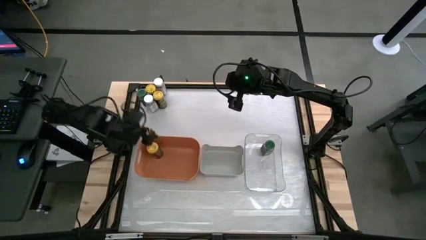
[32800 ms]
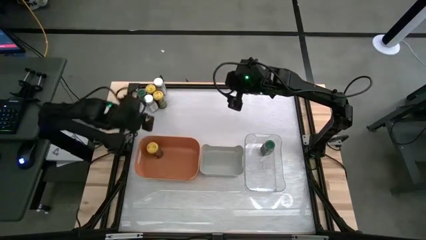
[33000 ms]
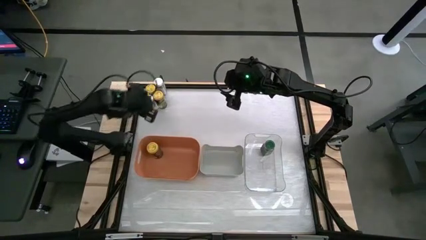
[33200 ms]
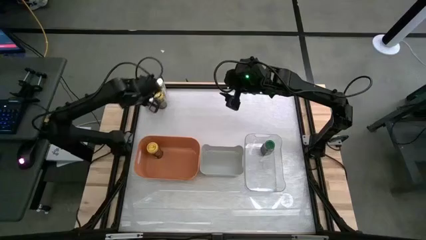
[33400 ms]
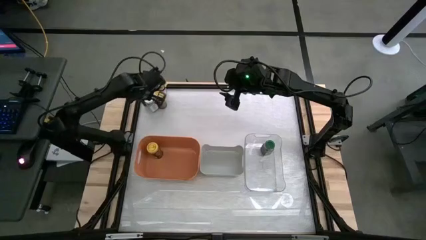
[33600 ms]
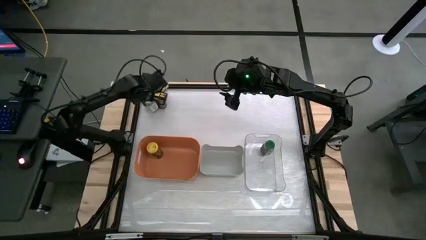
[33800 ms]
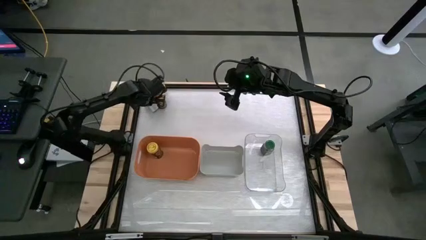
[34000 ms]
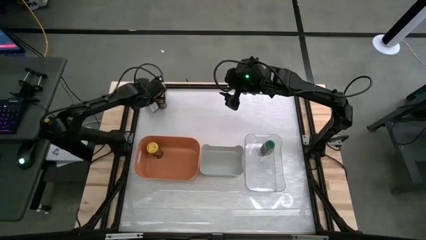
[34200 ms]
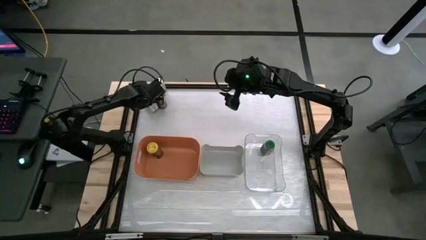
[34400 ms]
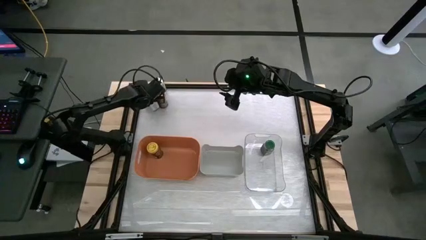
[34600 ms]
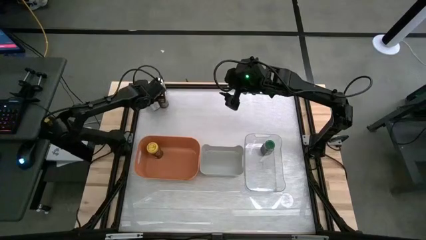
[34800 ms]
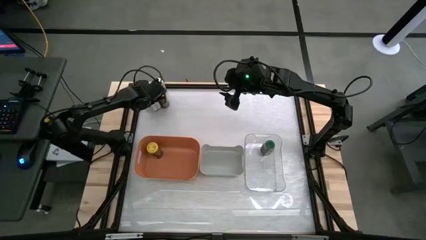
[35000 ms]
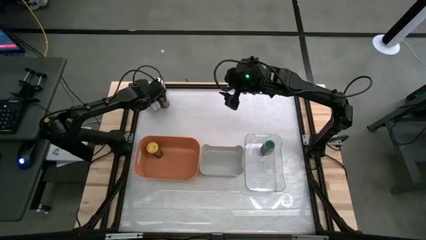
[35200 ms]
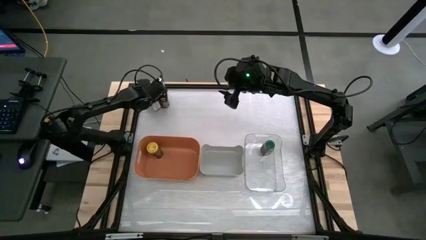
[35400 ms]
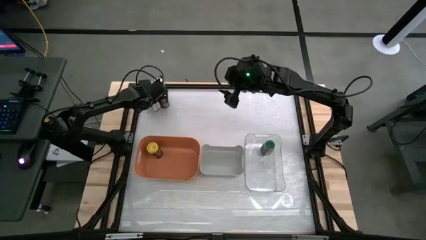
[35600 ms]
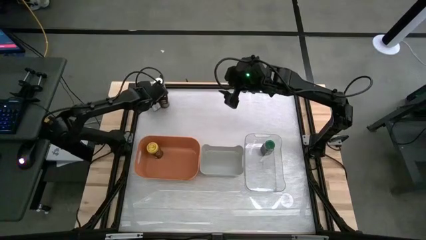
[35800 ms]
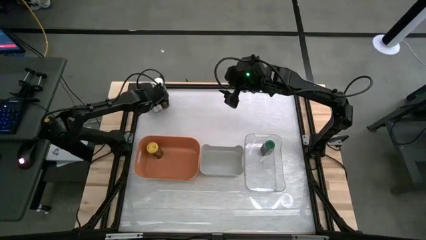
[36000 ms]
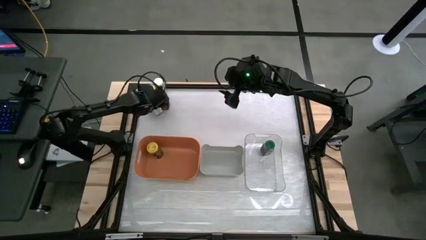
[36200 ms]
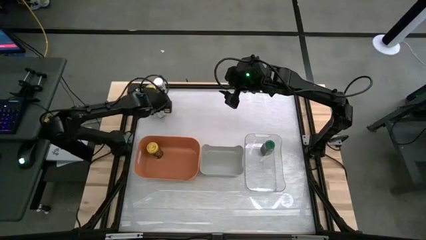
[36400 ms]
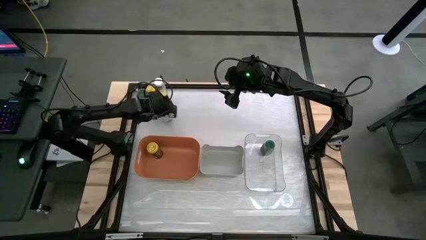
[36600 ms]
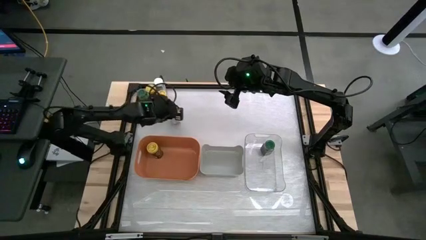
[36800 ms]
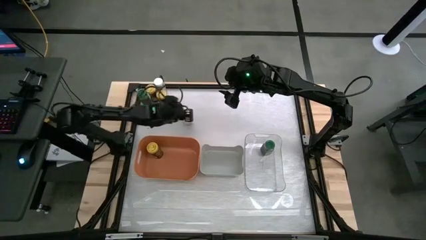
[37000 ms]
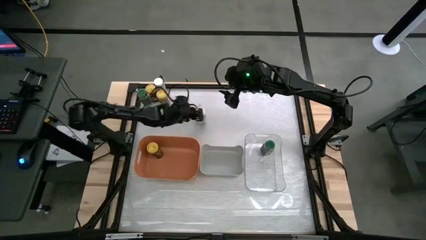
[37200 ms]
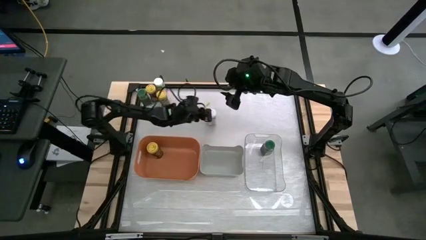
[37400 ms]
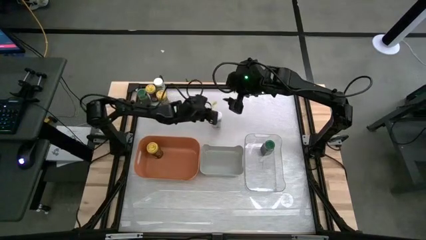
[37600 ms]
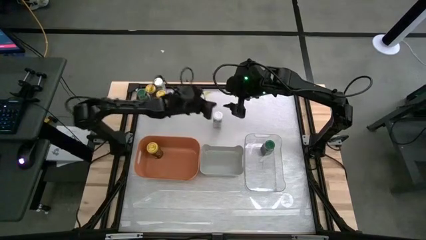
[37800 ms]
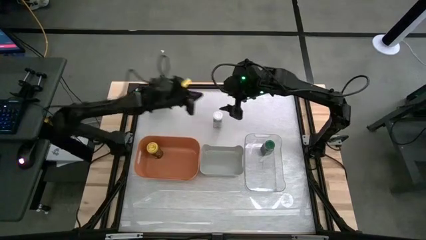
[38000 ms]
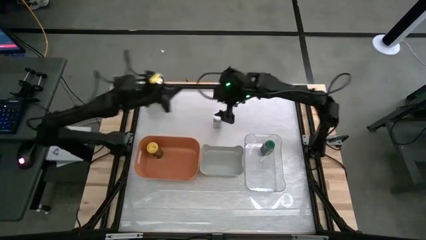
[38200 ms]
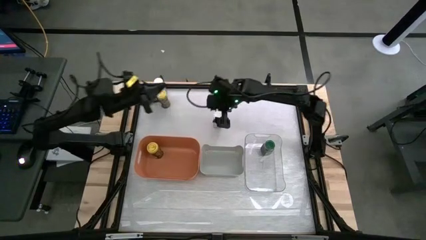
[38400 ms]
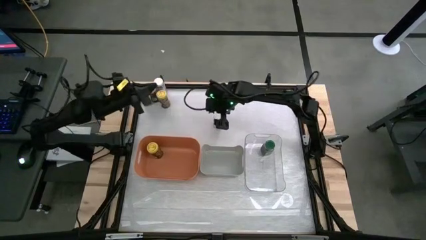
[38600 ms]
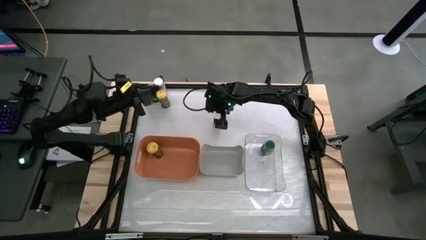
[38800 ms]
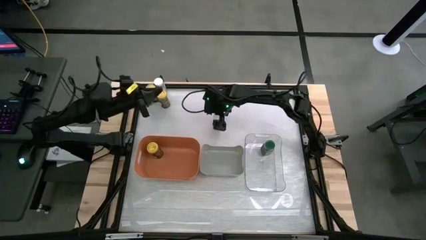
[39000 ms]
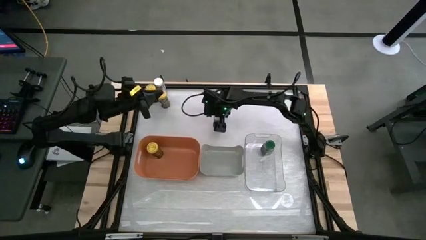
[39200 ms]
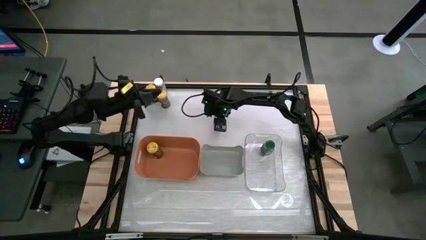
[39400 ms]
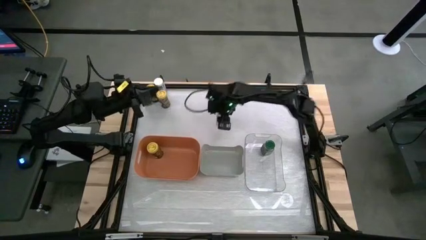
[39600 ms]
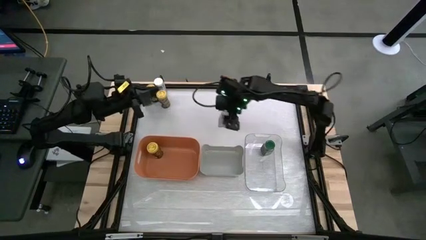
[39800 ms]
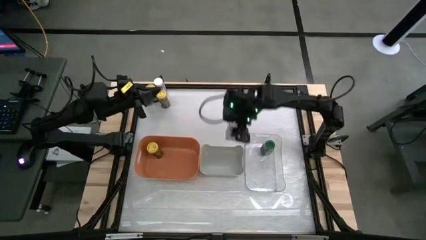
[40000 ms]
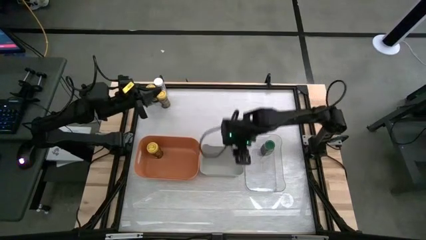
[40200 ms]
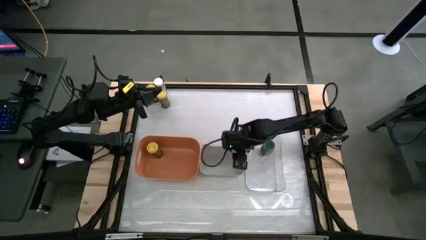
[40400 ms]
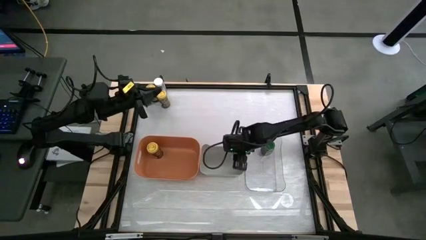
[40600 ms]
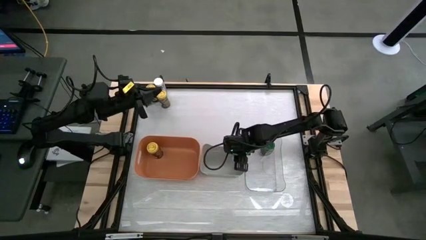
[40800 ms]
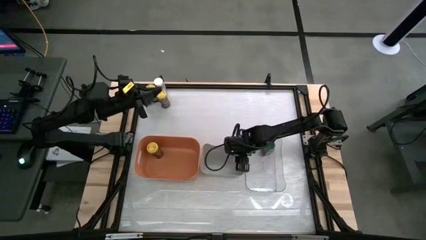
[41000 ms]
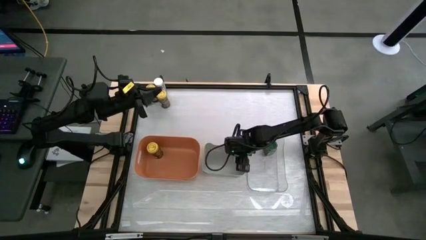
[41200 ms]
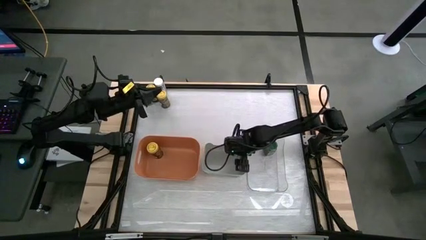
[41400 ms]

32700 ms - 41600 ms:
Task: Sort spices by type
Put the bottom white seasoning bottle into the gray bin

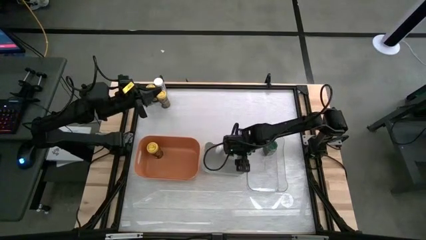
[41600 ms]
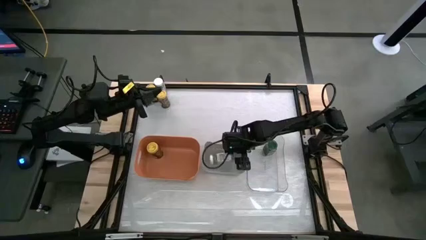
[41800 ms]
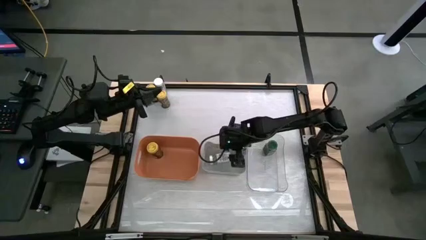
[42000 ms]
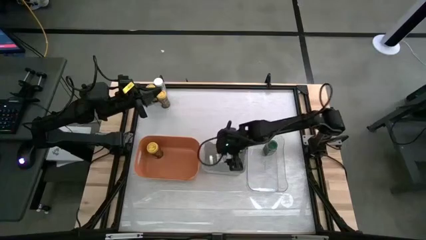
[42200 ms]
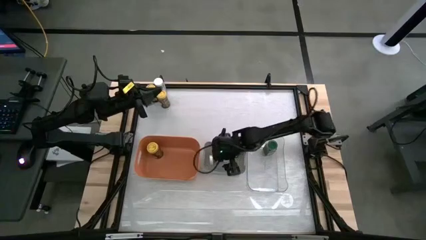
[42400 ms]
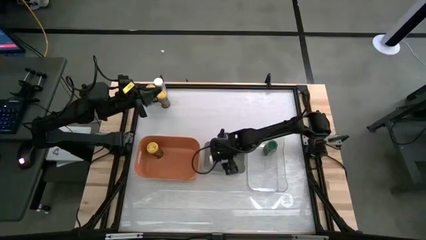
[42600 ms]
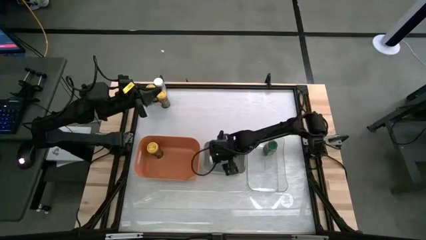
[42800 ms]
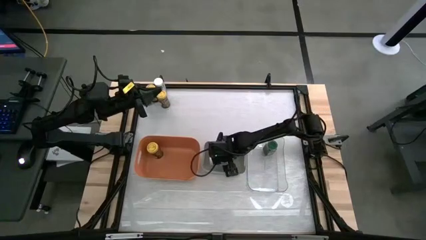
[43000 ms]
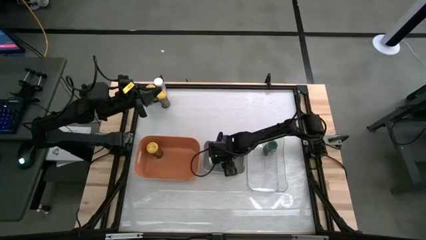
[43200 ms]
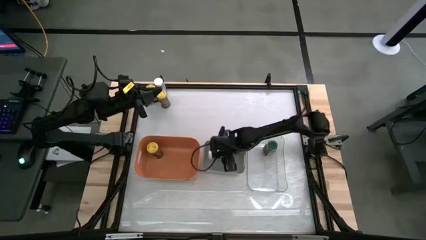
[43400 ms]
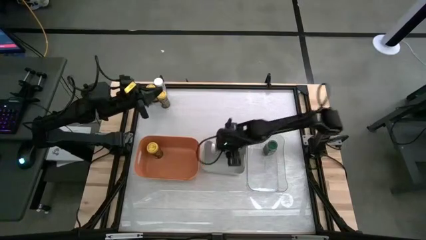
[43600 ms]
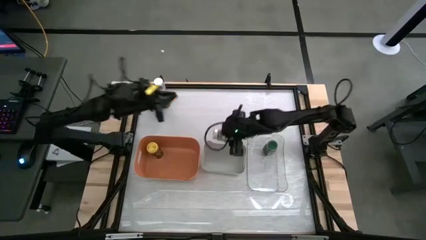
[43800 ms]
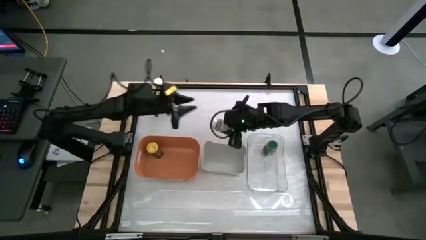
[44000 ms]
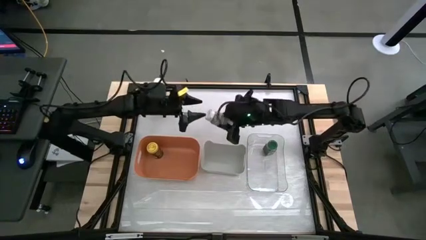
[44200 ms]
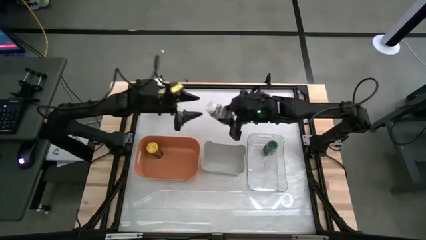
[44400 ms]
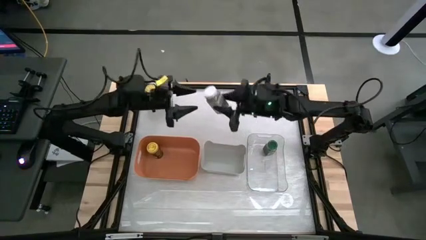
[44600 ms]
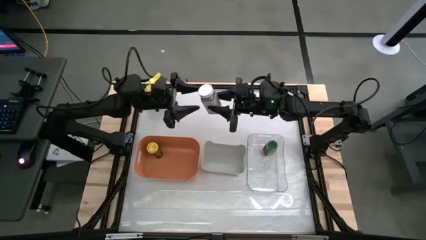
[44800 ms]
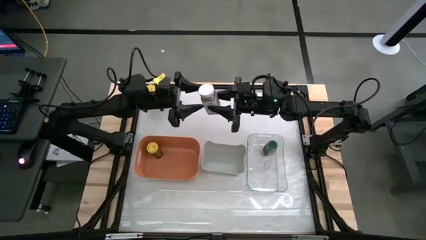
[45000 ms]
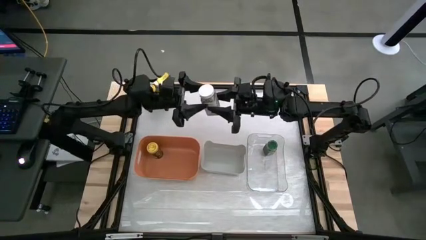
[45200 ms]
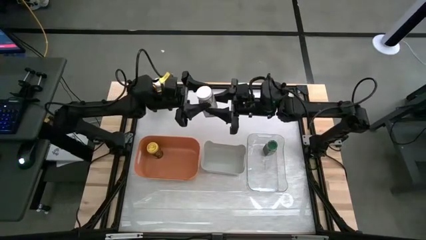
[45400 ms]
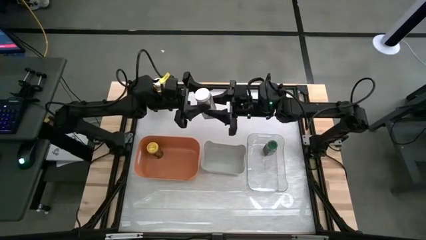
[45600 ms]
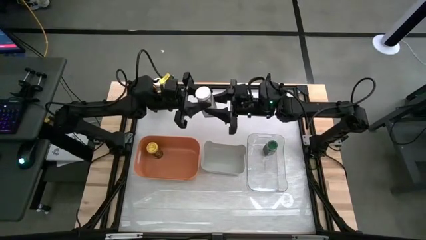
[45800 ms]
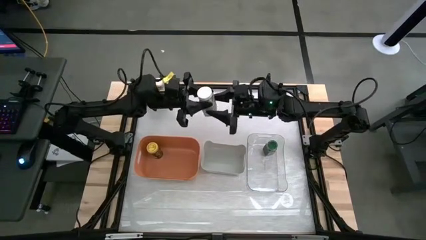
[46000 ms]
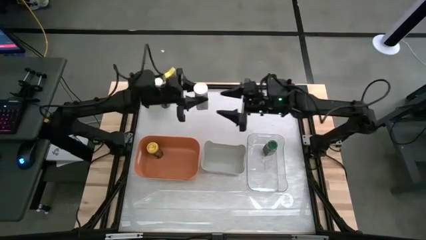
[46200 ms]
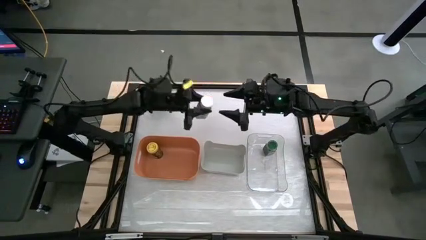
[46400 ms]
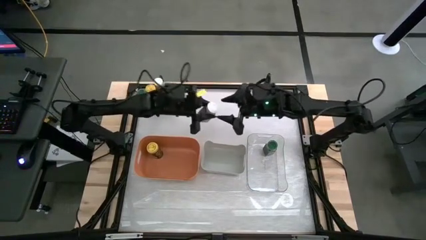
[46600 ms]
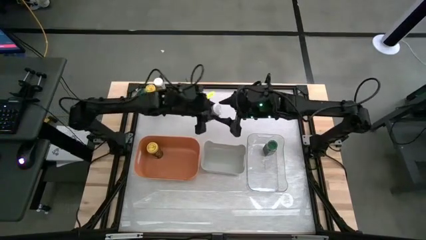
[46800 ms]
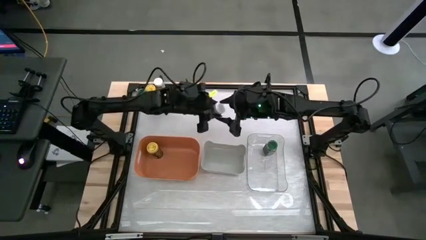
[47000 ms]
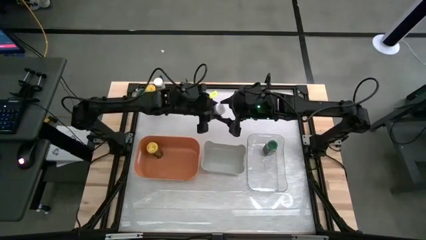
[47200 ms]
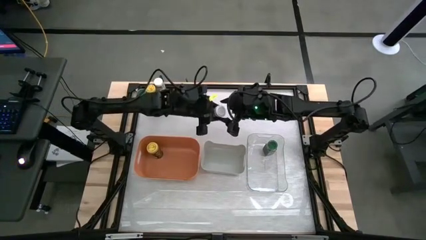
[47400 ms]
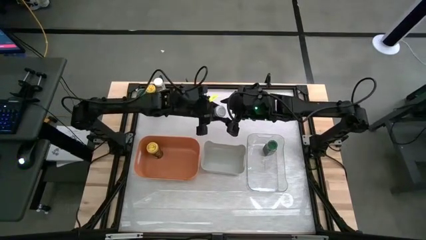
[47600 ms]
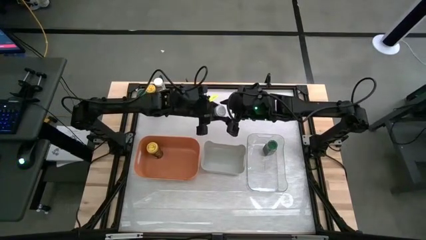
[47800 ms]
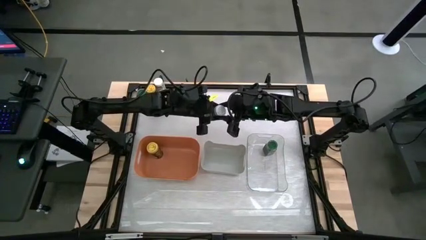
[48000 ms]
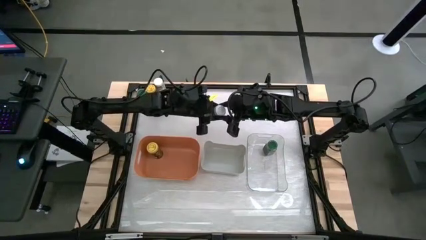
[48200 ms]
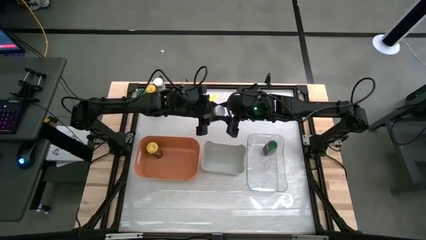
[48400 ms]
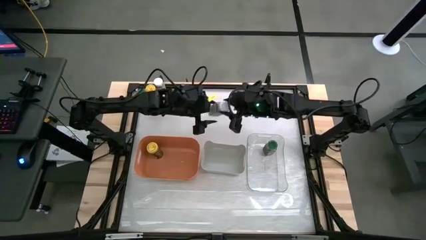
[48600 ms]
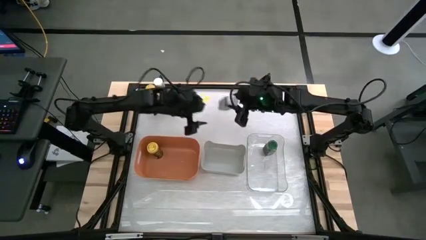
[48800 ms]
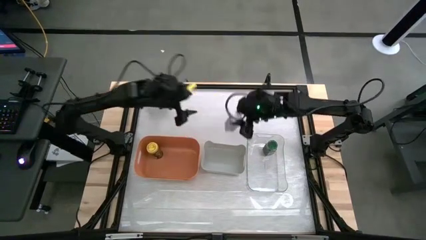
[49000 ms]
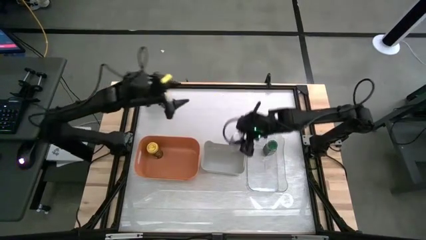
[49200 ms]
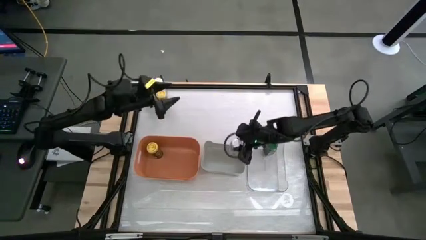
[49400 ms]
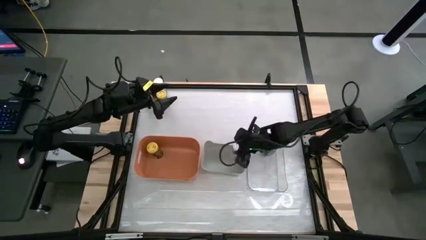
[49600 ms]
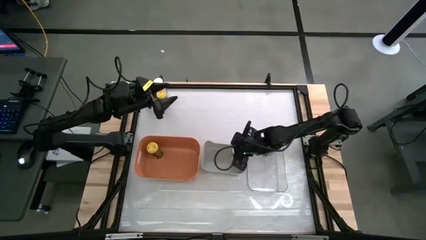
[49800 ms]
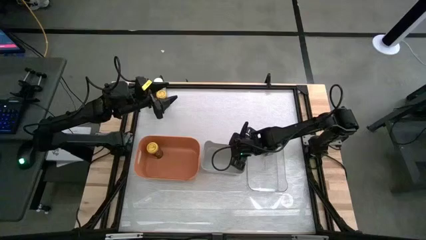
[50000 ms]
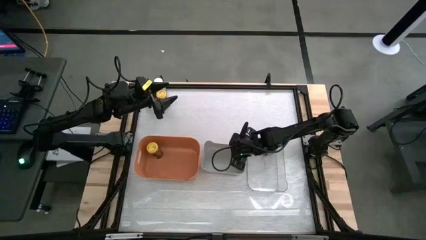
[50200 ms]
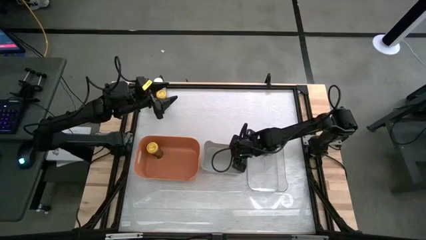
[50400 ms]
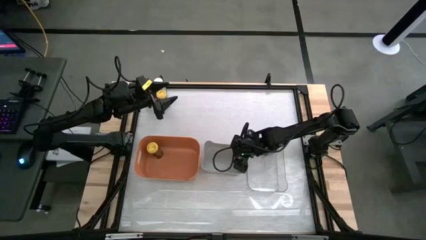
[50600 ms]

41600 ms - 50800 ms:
Put the bottom white seasoning bottle into the gray bin
